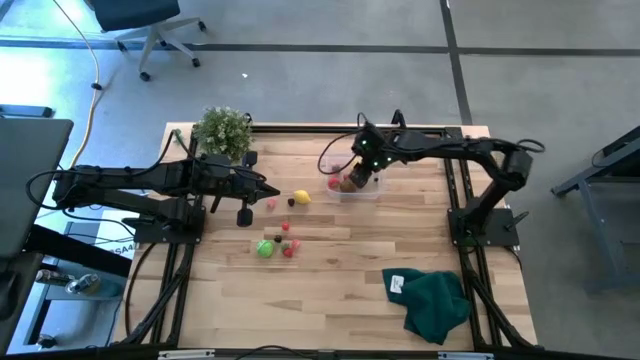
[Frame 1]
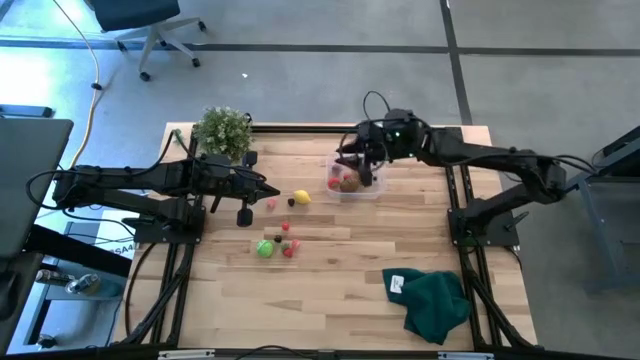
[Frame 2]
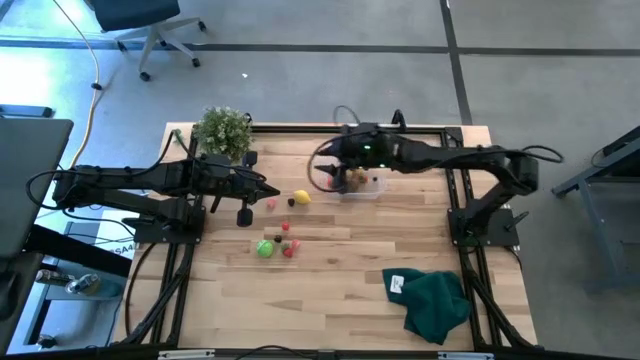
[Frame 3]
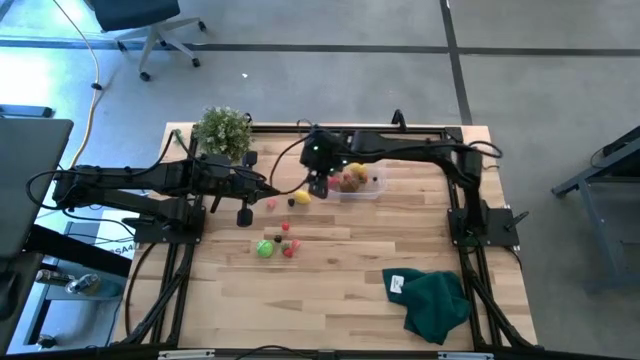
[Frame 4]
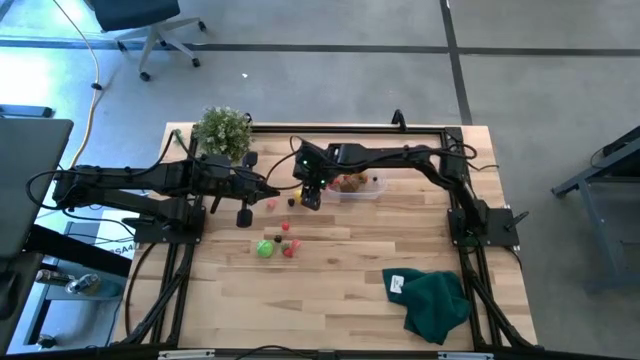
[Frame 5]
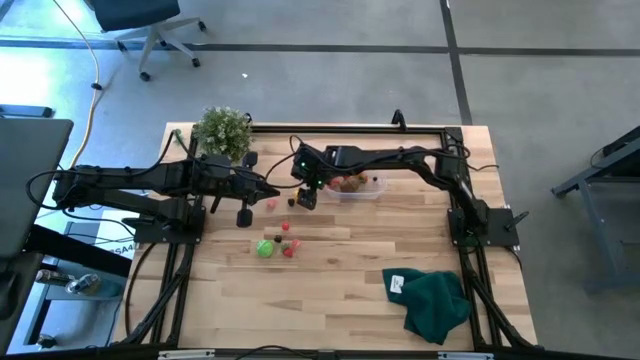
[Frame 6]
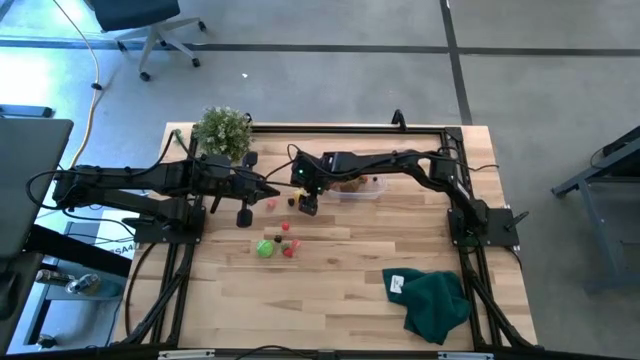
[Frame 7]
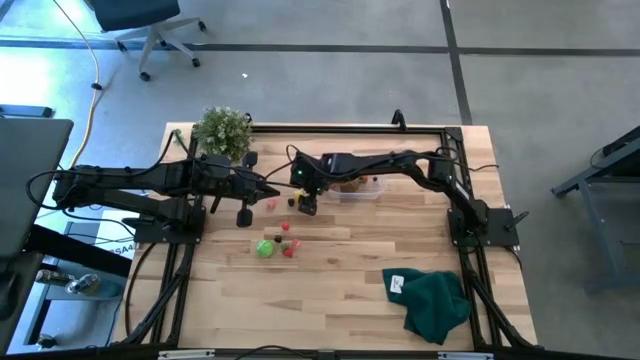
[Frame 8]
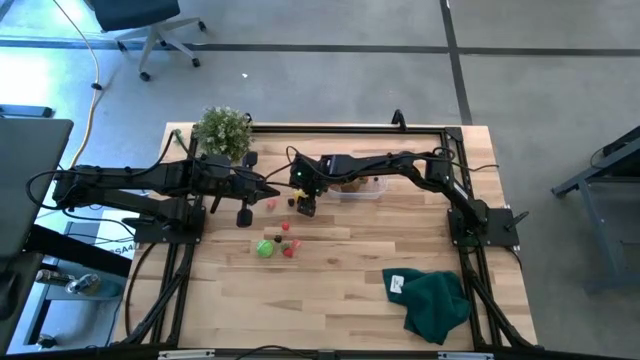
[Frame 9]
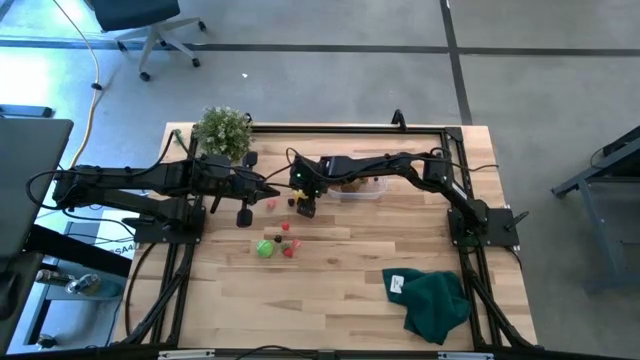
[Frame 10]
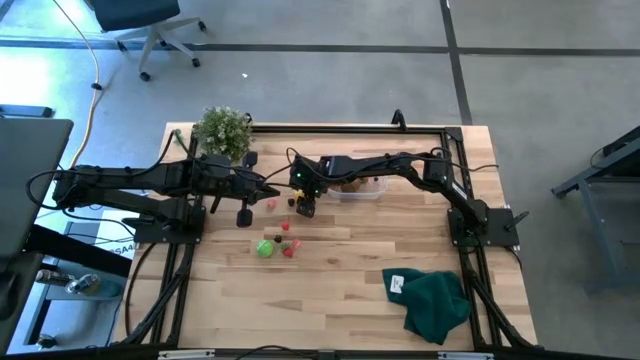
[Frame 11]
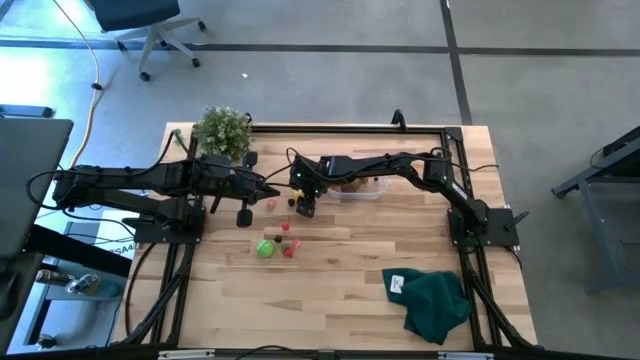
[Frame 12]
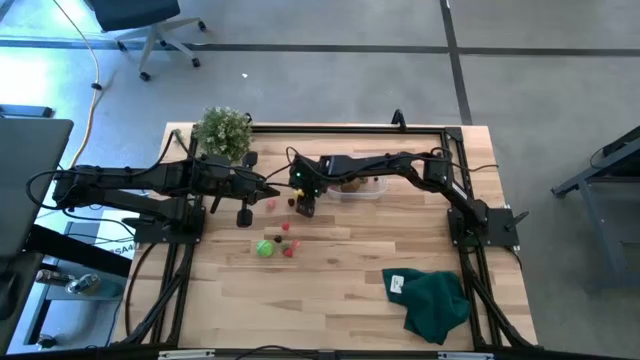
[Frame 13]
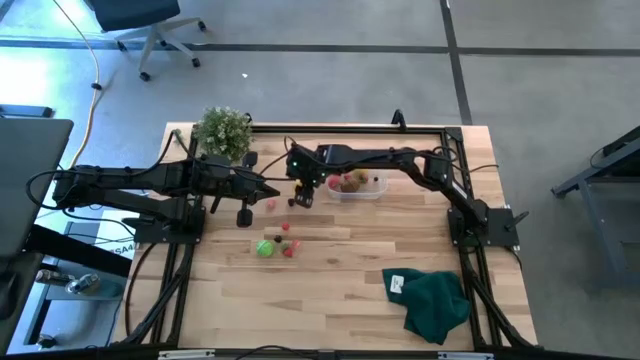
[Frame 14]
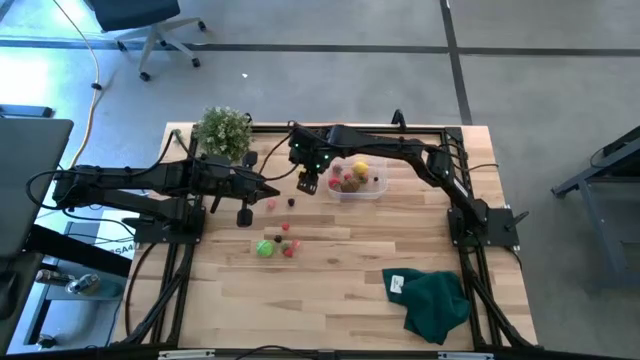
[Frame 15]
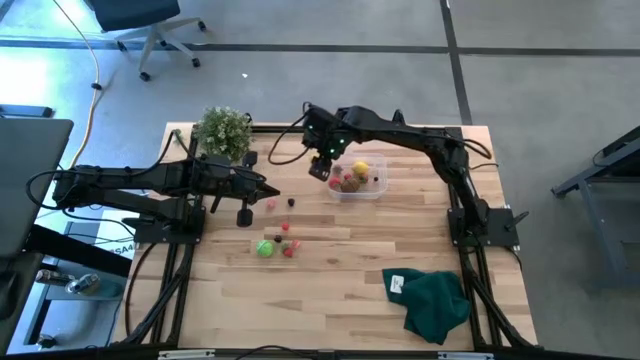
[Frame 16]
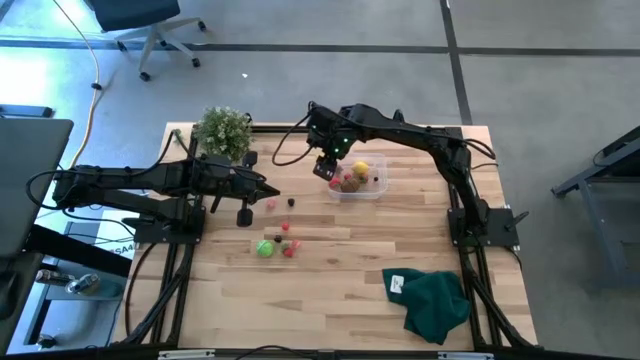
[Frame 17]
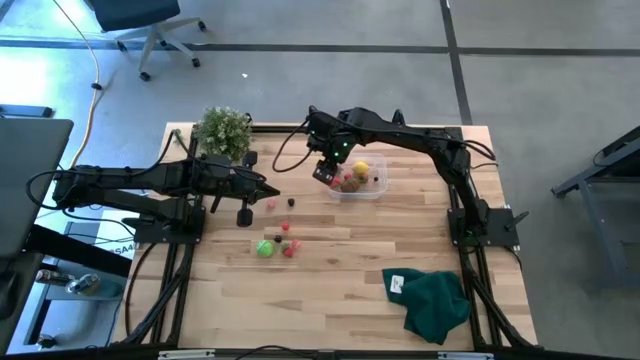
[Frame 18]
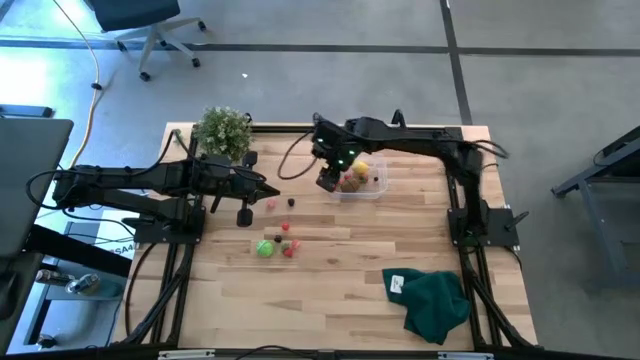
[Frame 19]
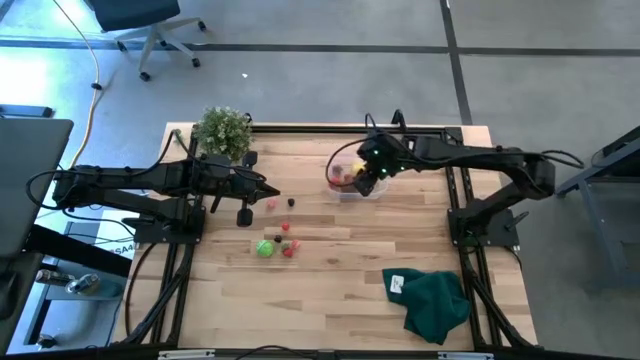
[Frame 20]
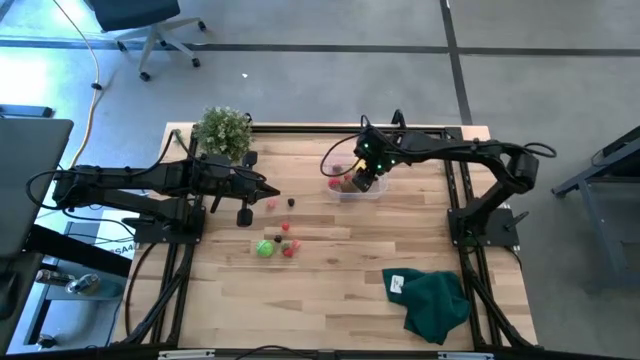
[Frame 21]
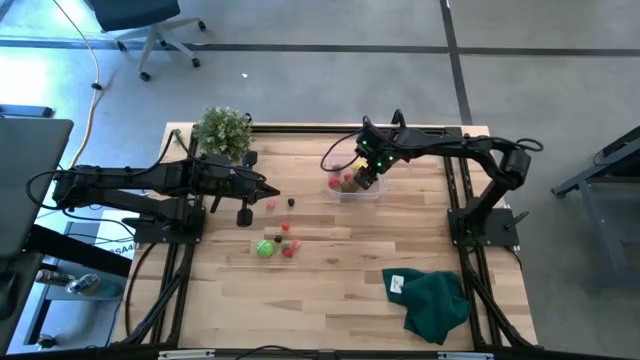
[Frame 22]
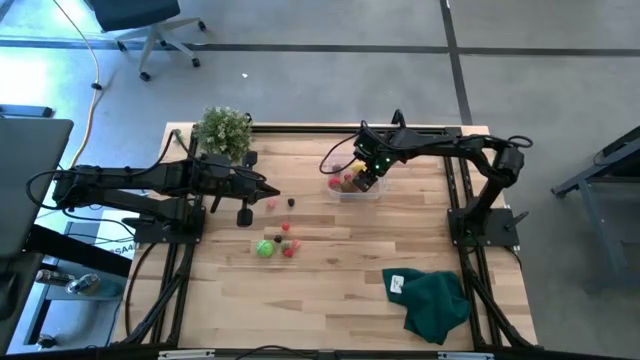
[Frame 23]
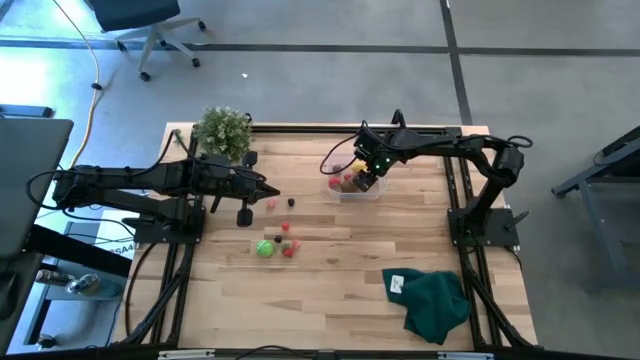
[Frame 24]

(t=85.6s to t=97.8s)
Task: Pick and placing Produce into tupperware
Put the yellow lemon into the transparent bin

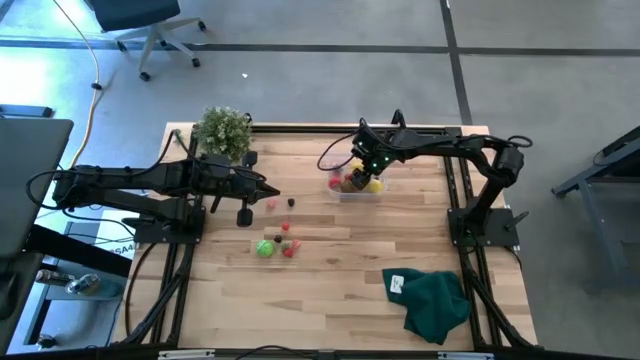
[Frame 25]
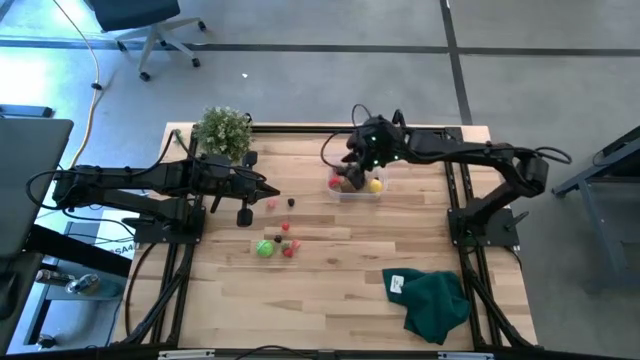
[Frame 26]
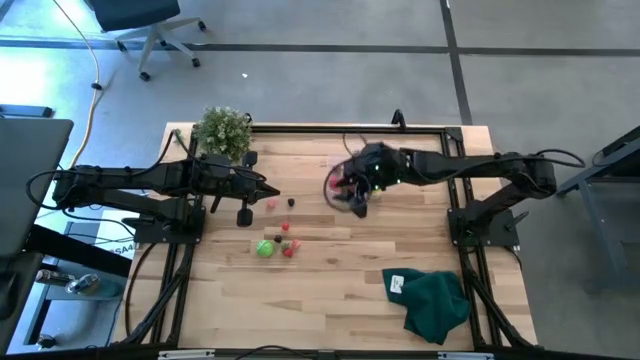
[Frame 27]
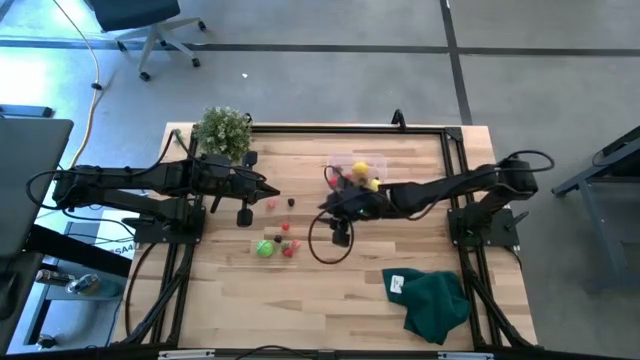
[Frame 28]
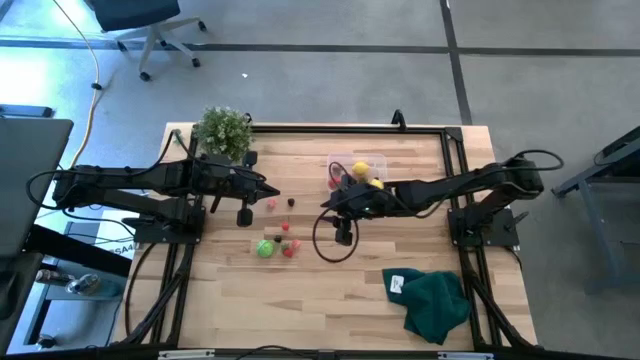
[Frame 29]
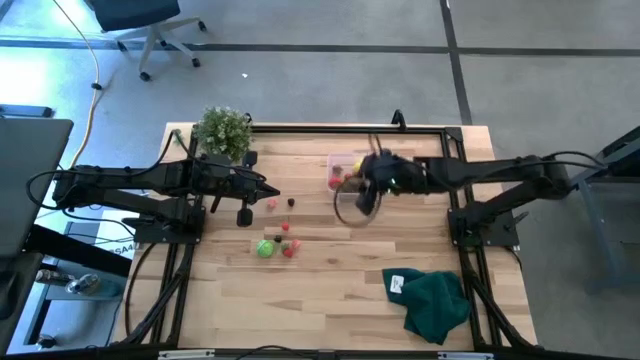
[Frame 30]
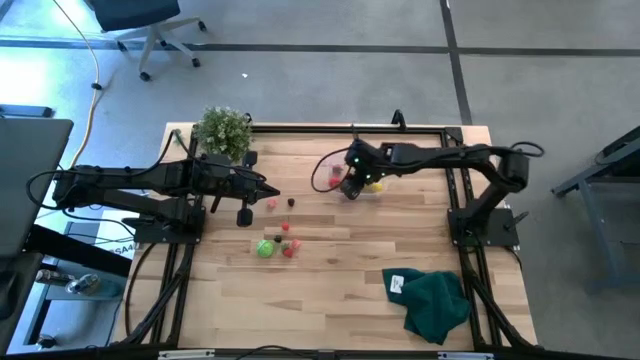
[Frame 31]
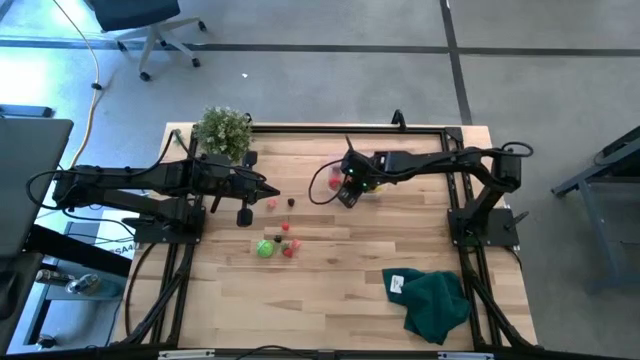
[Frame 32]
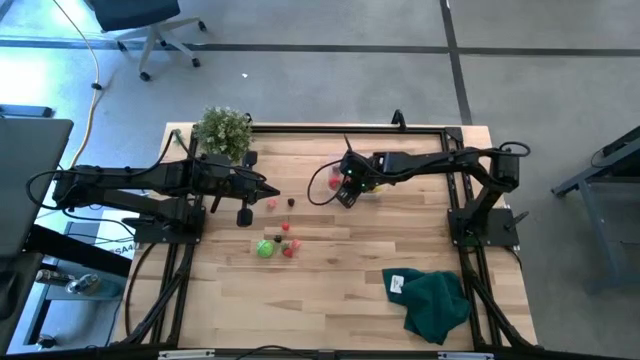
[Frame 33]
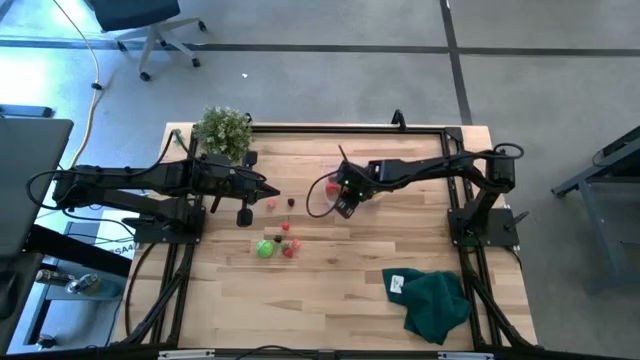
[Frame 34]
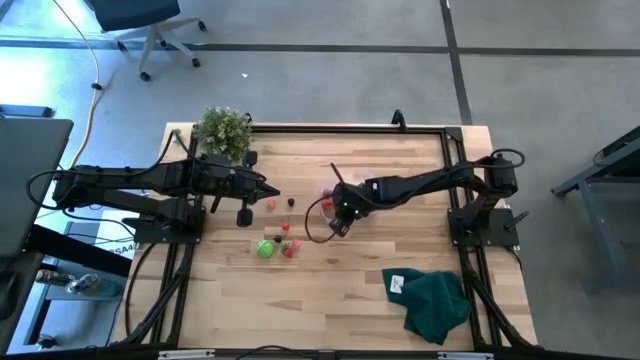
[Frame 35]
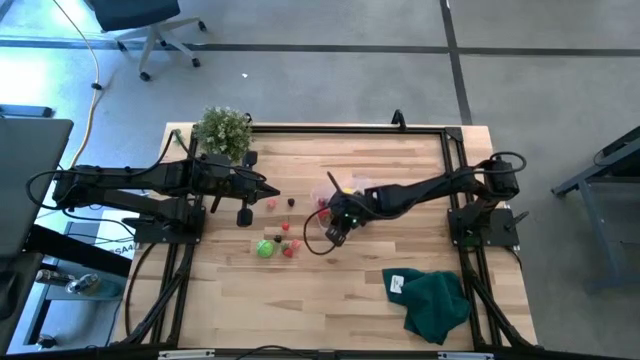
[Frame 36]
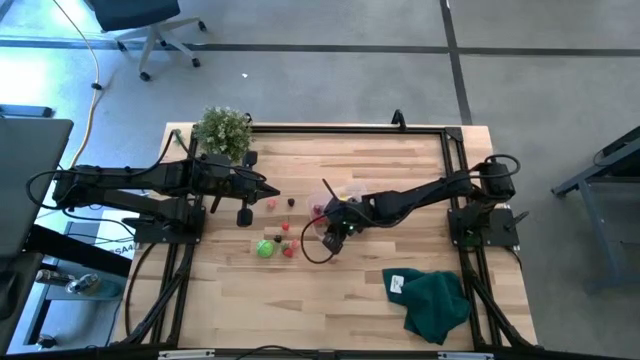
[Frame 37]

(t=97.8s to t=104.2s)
Adjust the transparent bin

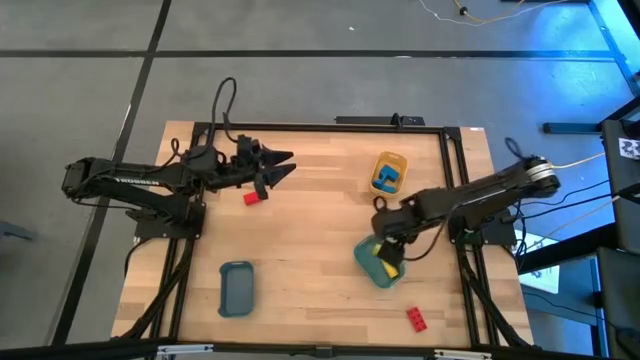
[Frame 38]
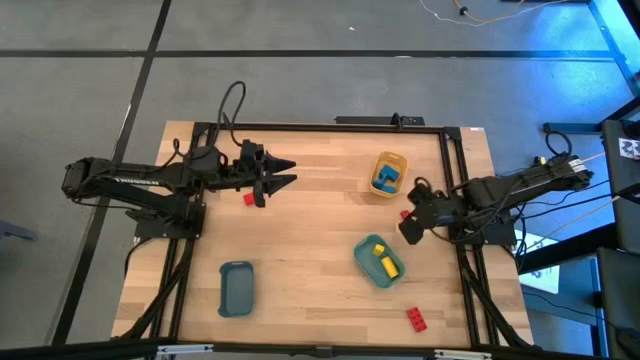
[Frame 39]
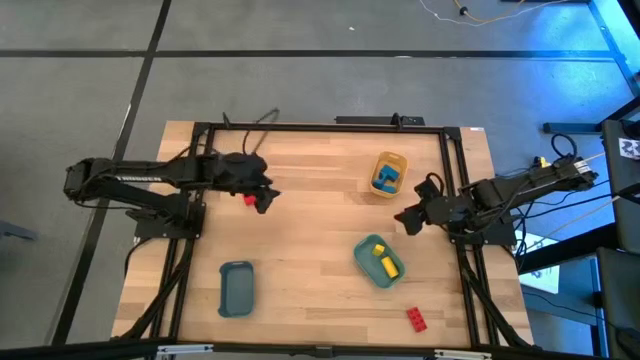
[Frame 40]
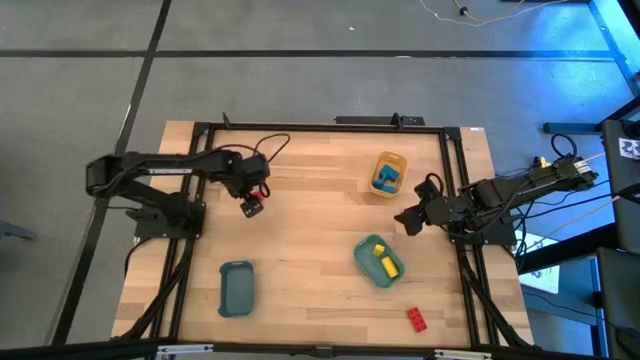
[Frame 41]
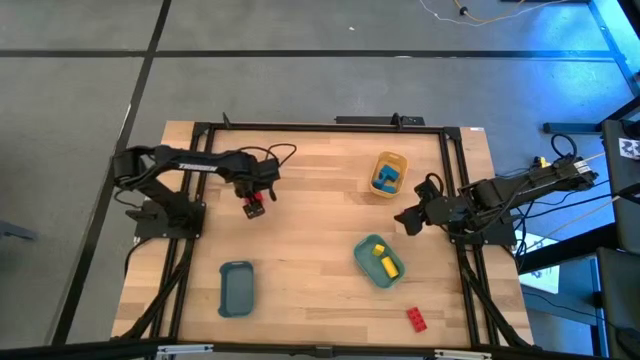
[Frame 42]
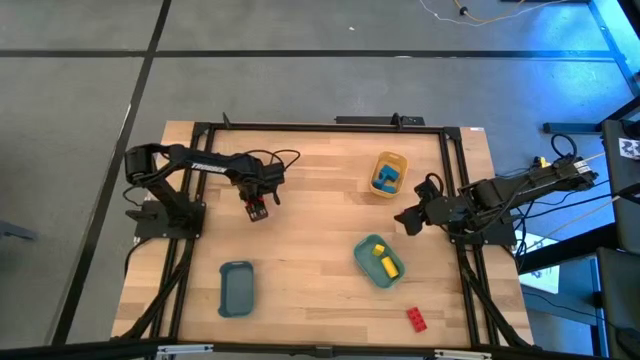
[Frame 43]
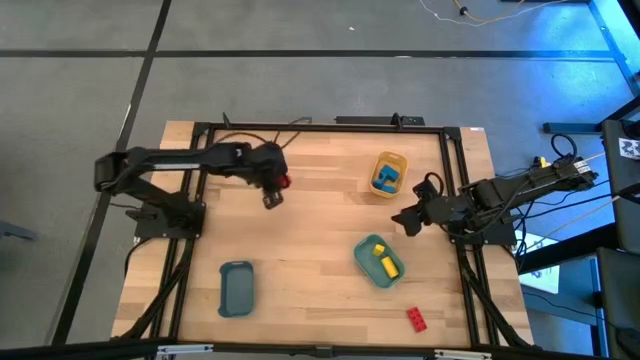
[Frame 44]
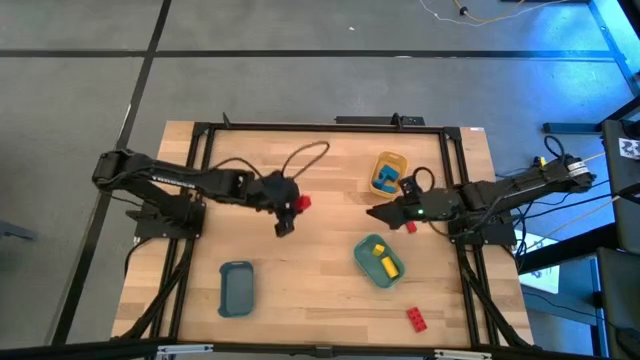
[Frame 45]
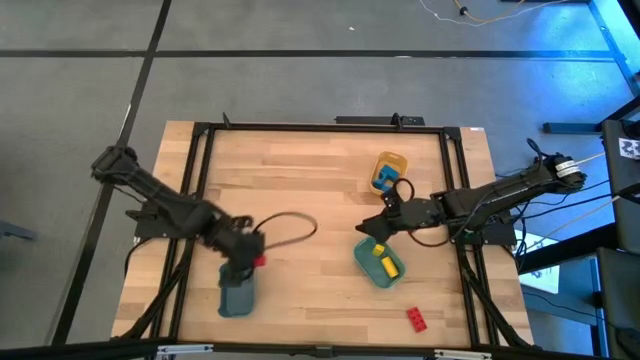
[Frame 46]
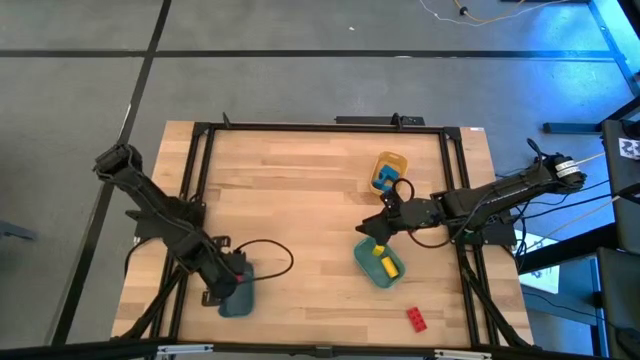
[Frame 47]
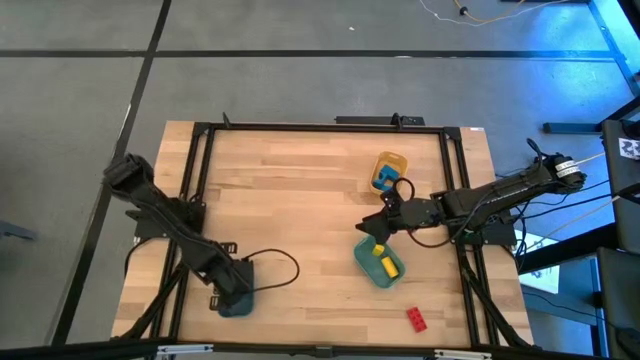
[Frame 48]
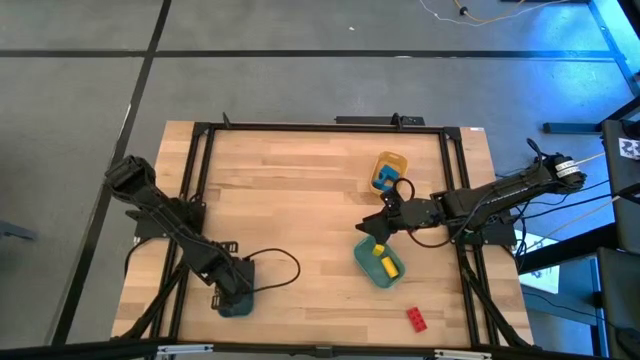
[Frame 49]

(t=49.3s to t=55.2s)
Task: Sort & place blocks by color
Put the left red block into the blue bin
